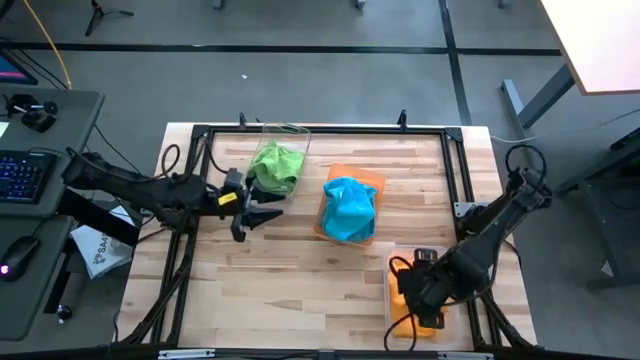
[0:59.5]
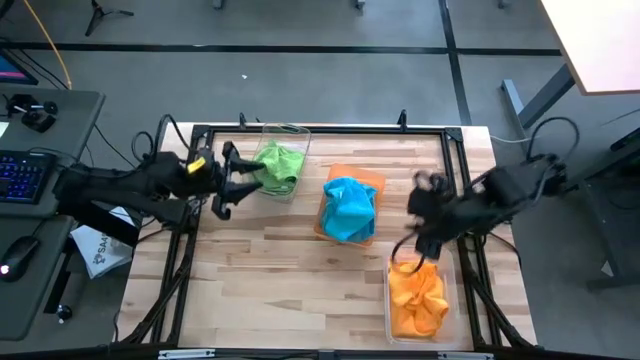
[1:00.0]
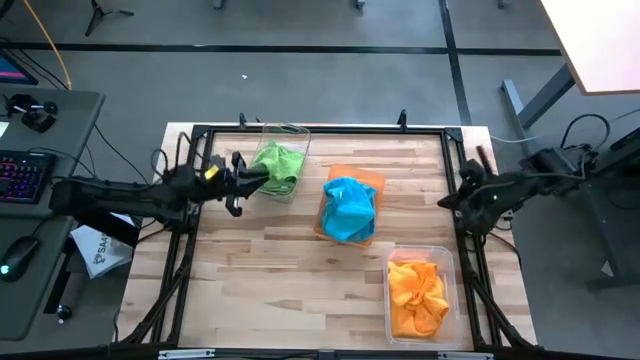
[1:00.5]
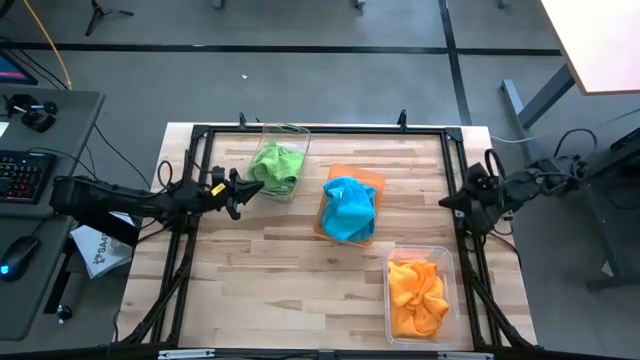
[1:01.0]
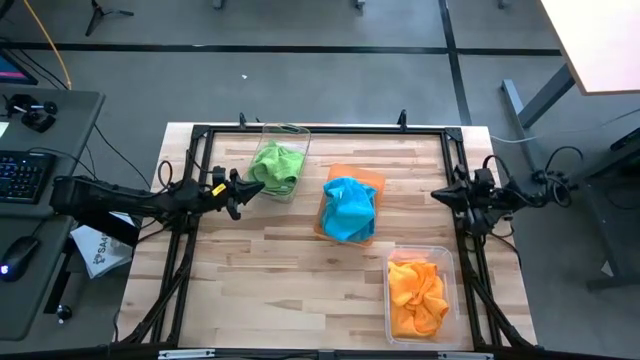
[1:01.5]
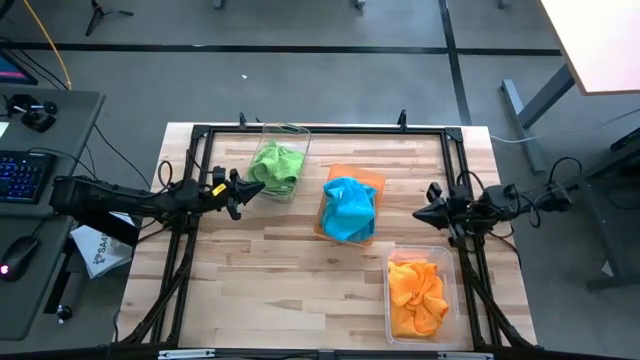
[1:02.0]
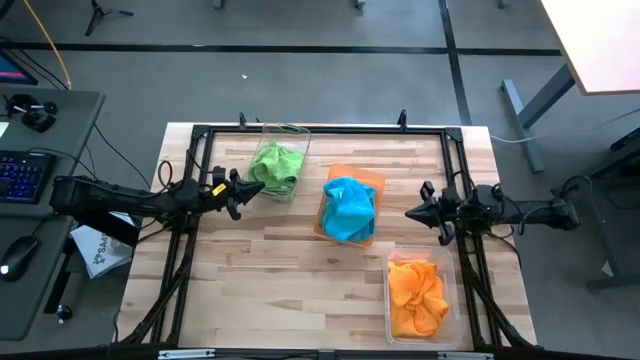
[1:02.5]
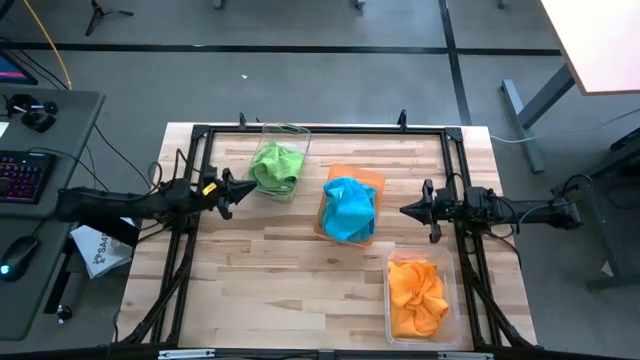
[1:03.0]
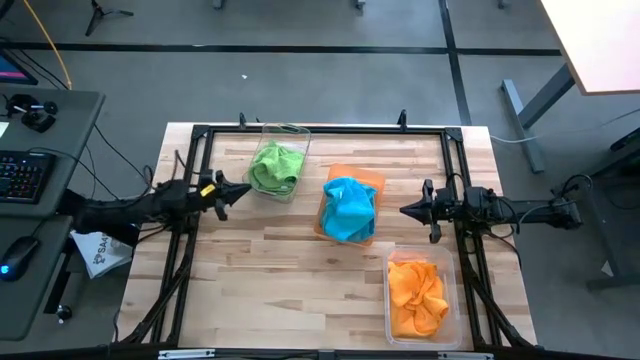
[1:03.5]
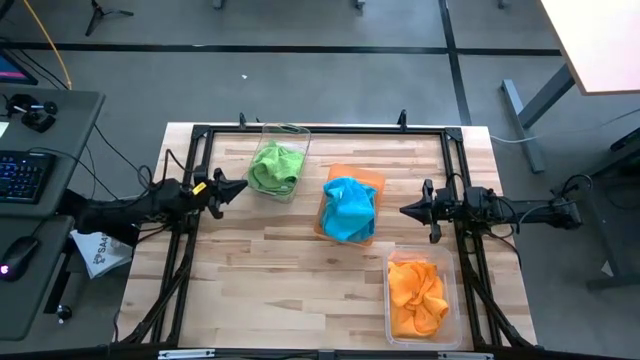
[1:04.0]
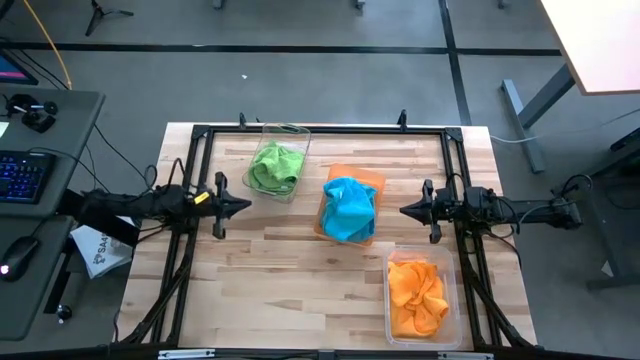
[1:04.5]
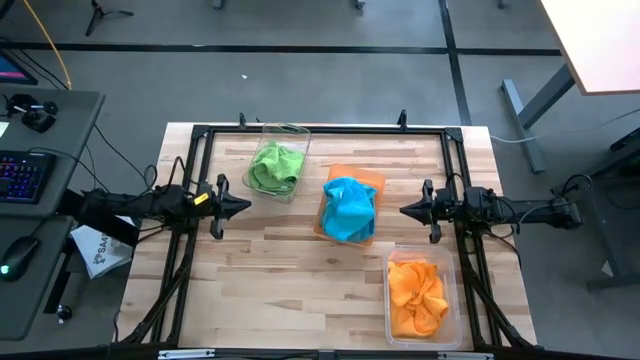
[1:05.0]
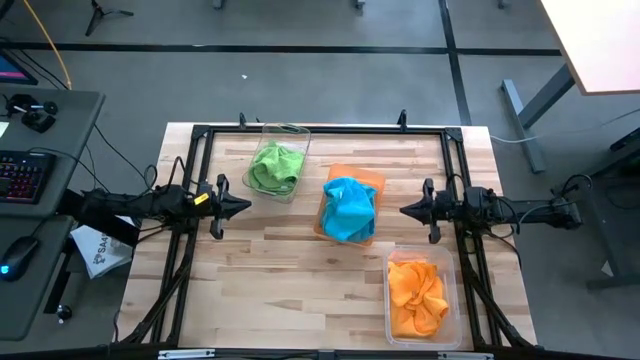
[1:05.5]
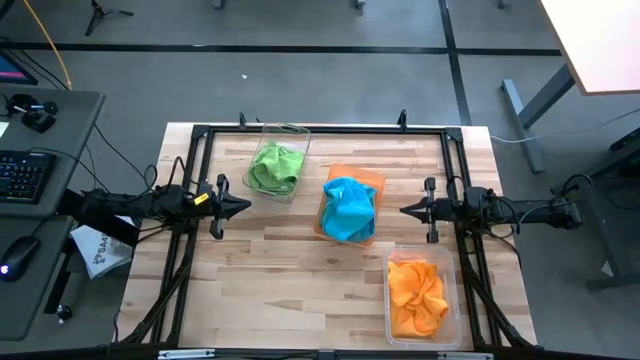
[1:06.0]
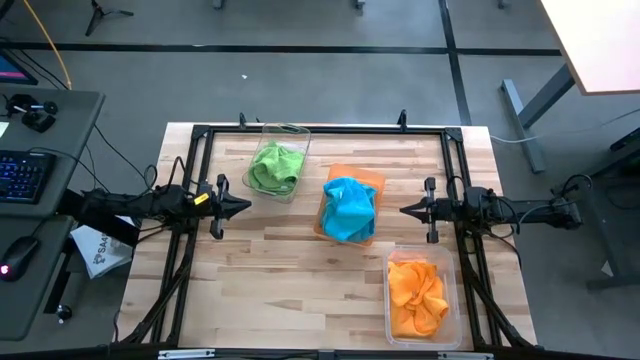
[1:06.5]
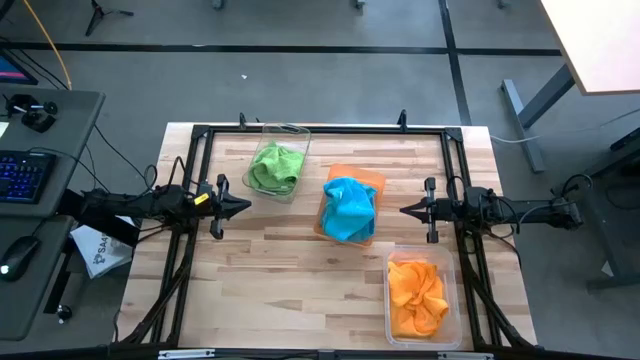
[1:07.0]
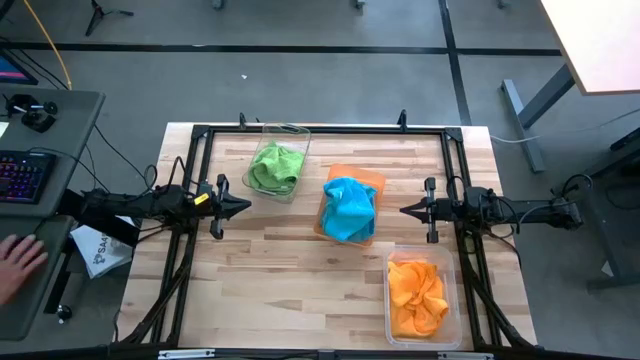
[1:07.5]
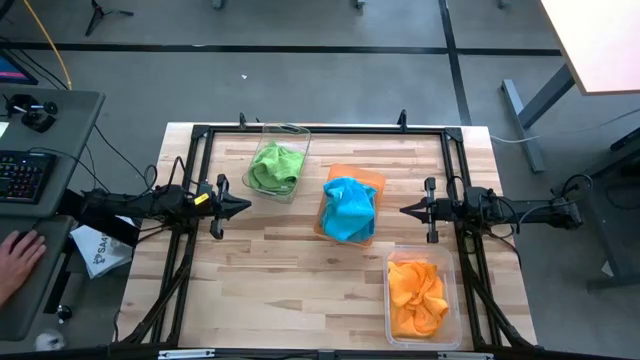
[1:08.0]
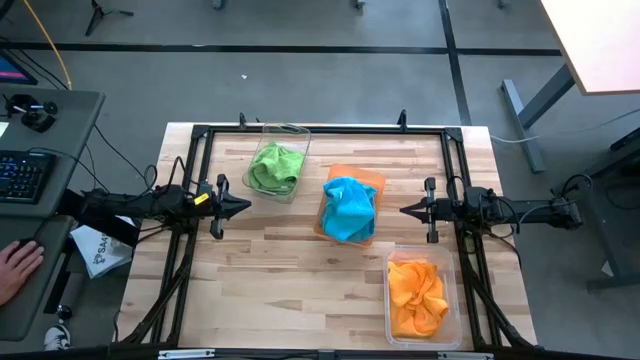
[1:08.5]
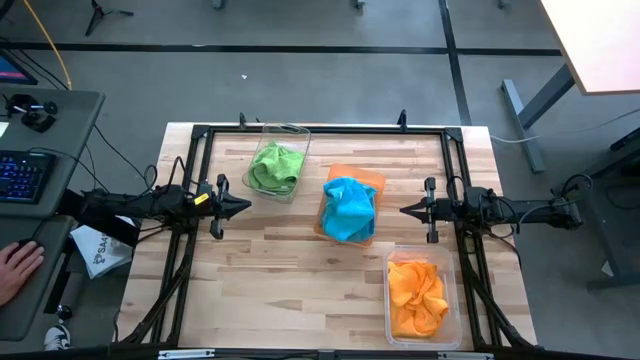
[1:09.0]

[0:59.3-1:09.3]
Task: Sort microfiber towel by color & place in baskets
Return to Home Position

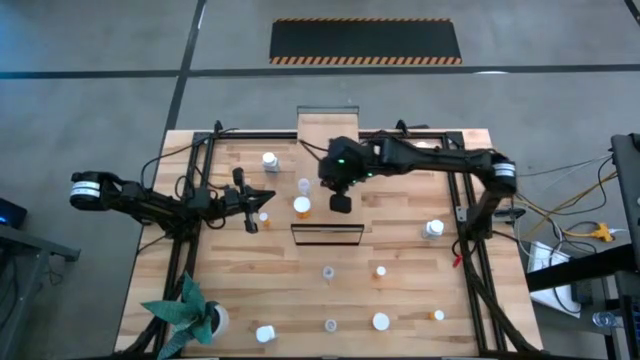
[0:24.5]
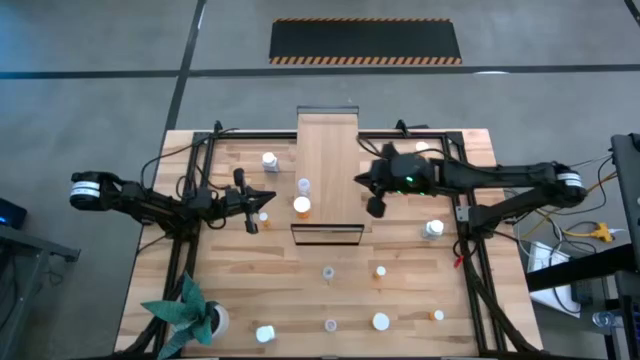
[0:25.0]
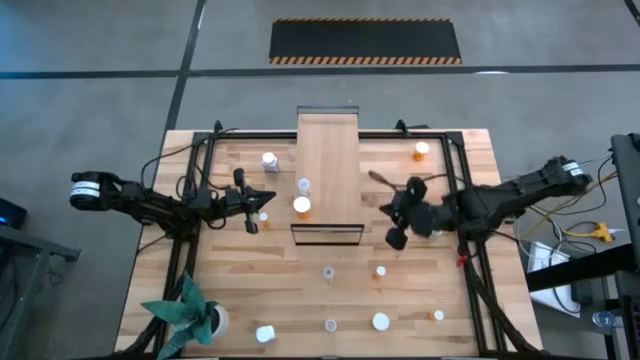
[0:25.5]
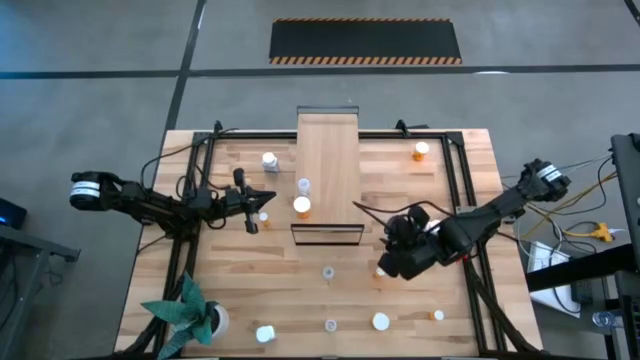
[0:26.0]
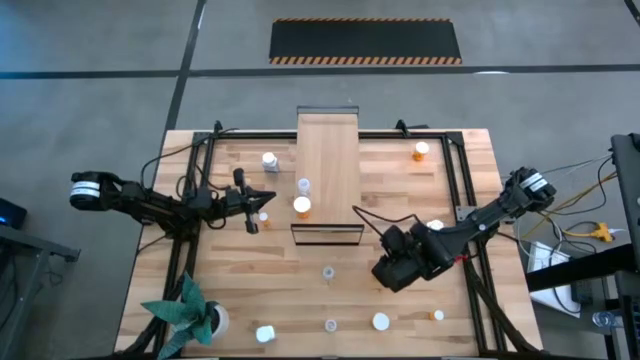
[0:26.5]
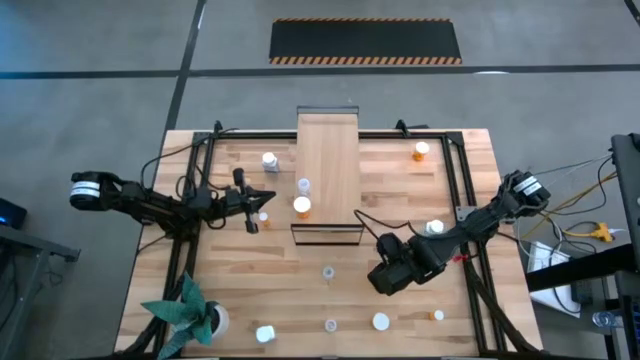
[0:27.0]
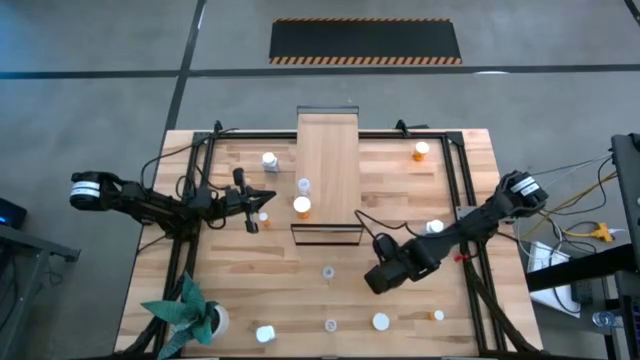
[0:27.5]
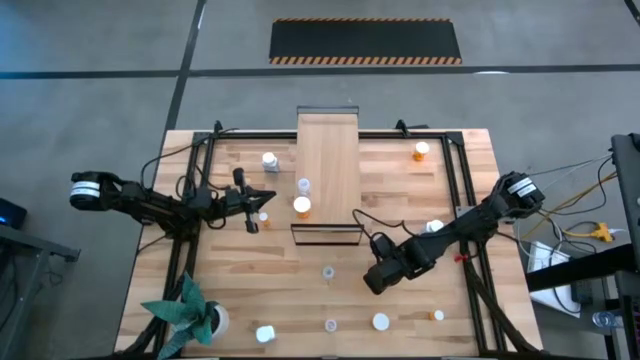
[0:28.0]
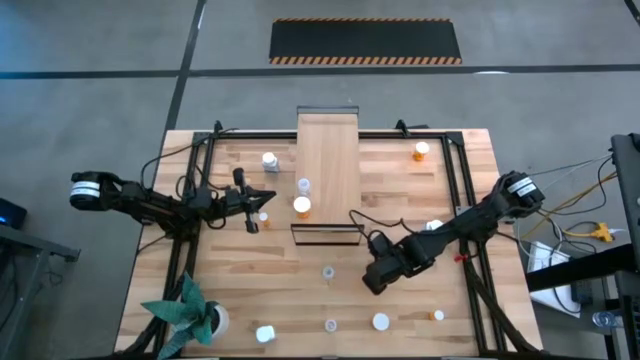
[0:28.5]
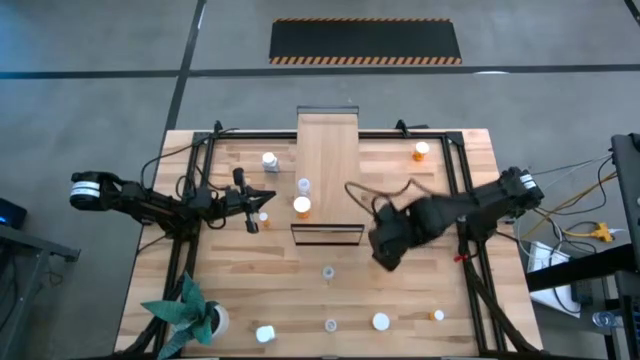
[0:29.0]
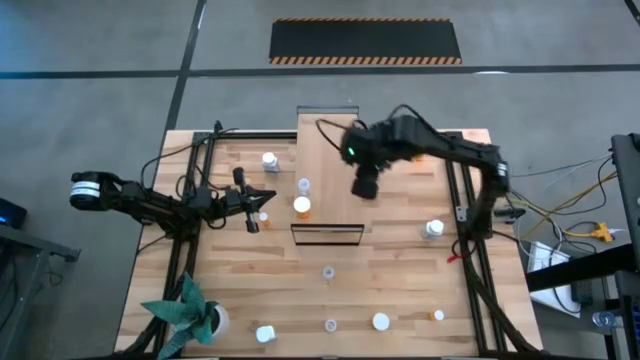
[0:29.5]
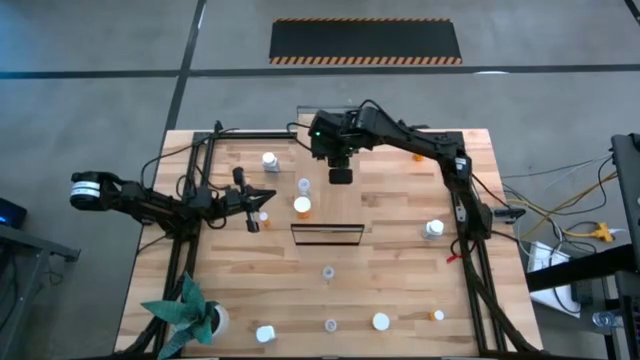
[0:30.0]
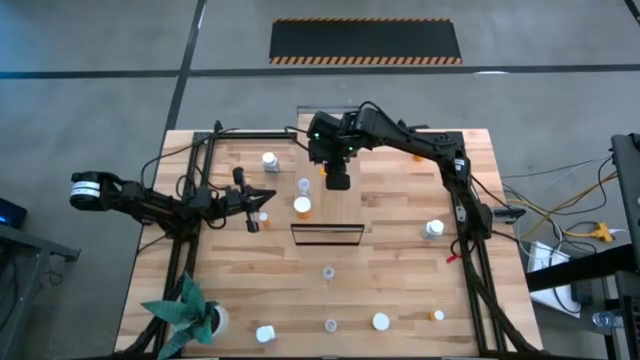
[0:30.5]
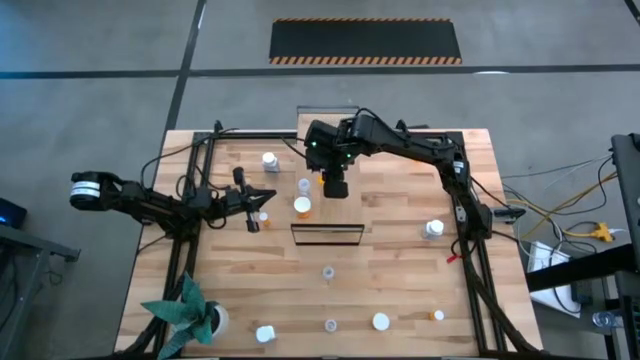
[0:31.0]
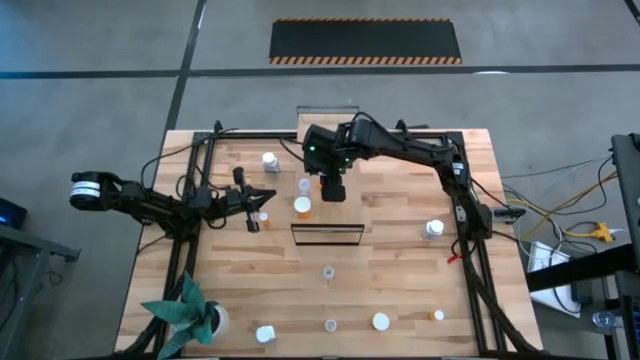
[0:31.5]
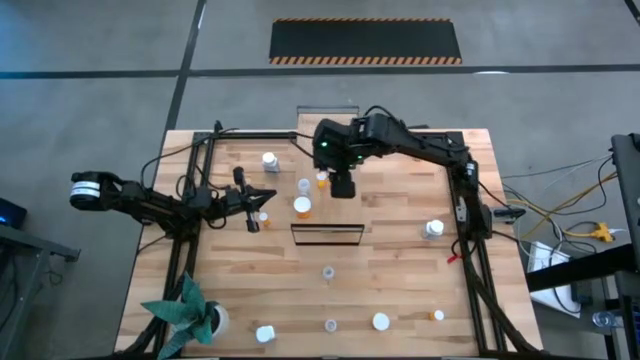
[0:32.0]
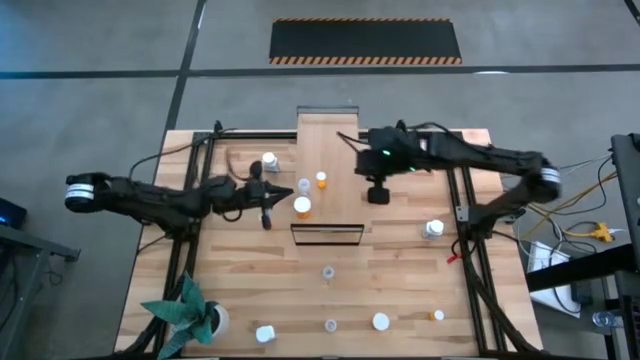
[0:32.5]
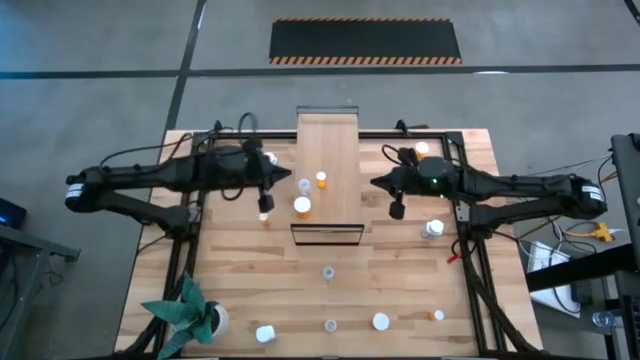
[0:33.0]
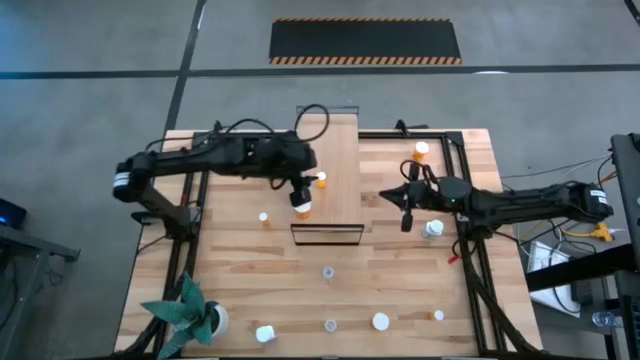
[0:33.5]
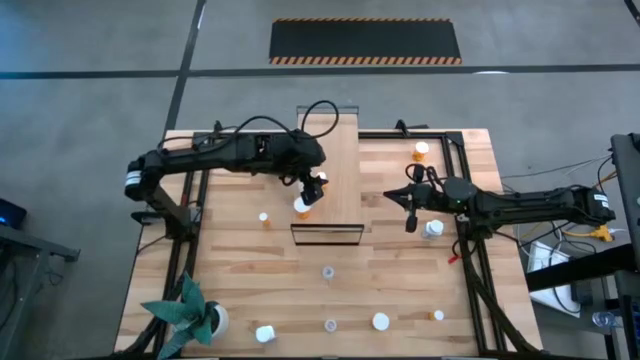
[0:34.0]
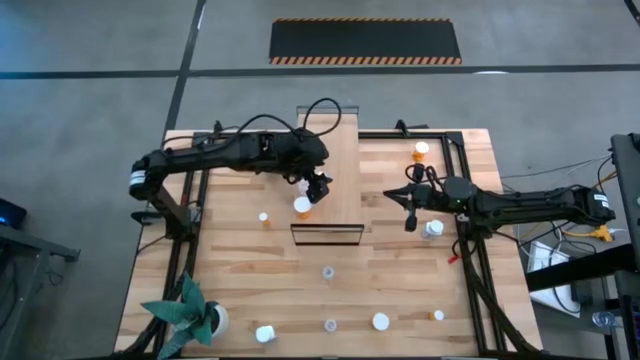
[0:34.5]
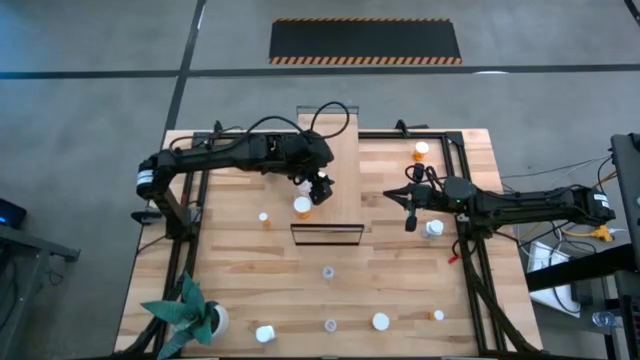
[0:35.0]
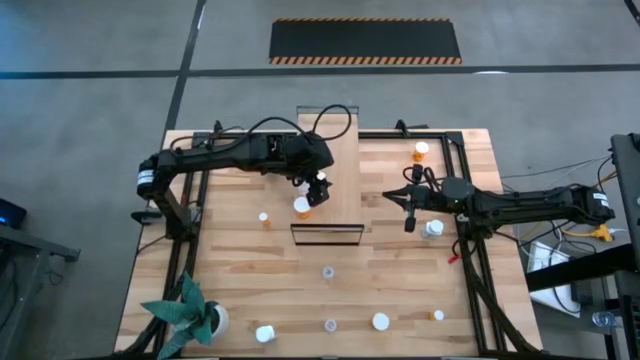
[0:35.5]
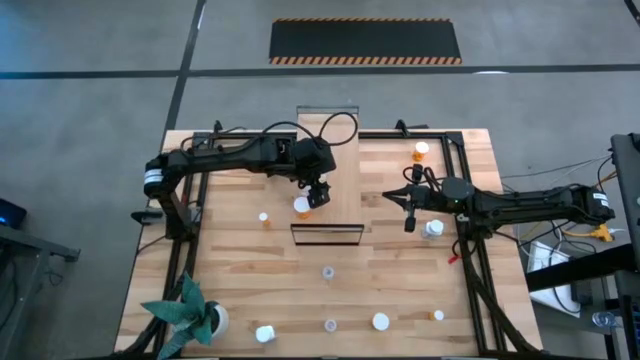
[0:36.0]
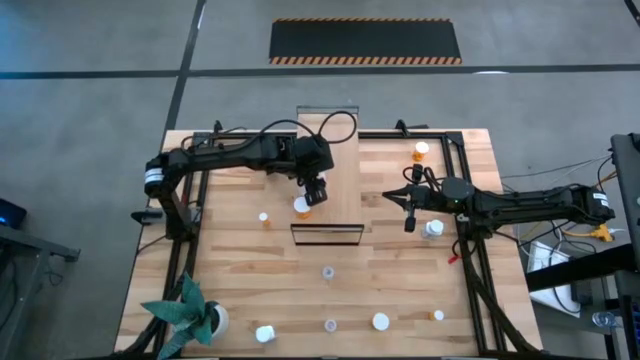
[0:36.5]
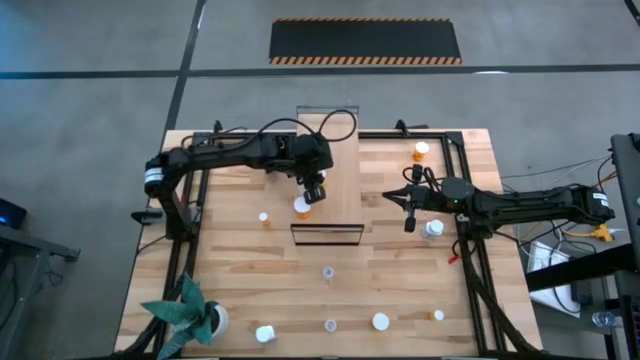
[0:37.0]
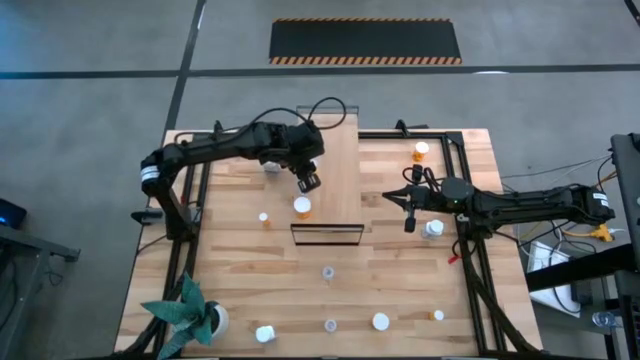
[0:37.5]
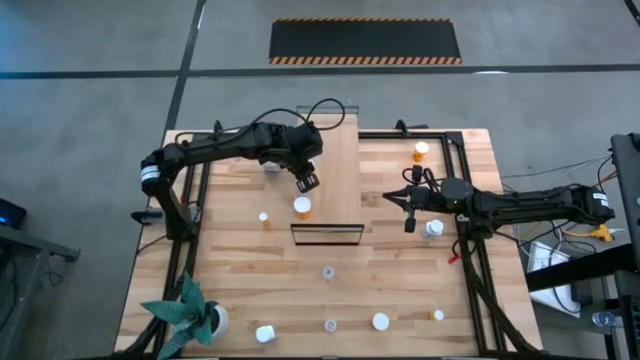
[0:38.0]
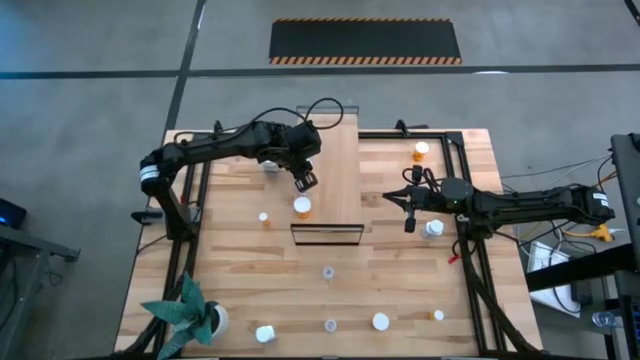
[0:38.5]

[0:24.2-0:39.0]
Task: Pick and place medicine bottles onto shelf by color
Put the middle small orange pill bottle on the shelf
